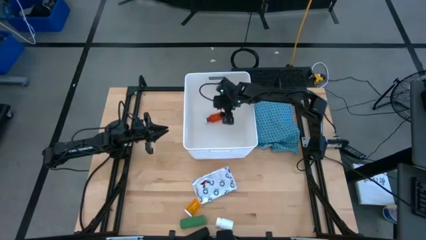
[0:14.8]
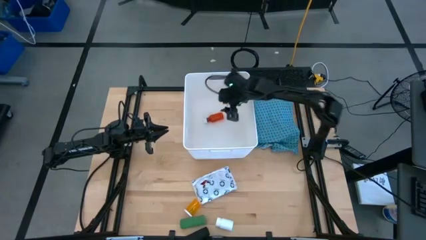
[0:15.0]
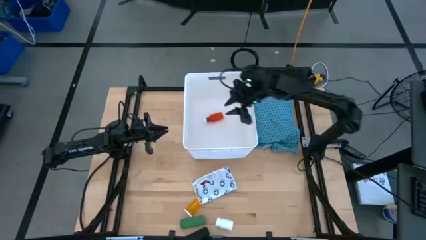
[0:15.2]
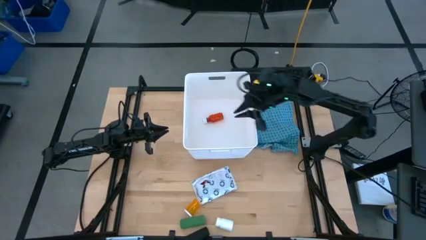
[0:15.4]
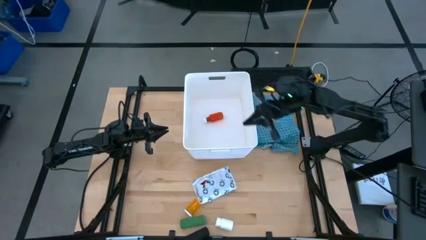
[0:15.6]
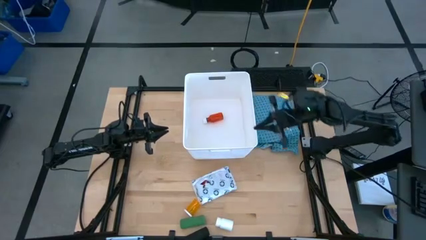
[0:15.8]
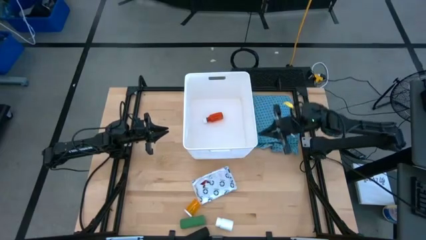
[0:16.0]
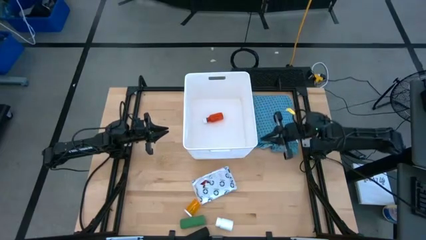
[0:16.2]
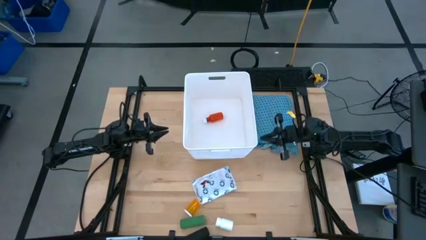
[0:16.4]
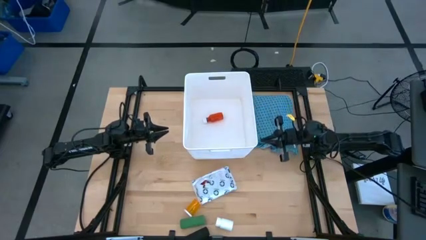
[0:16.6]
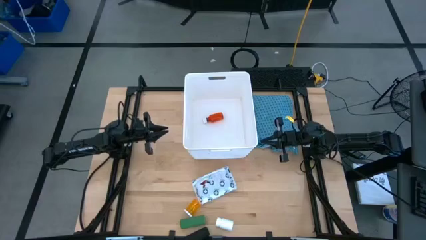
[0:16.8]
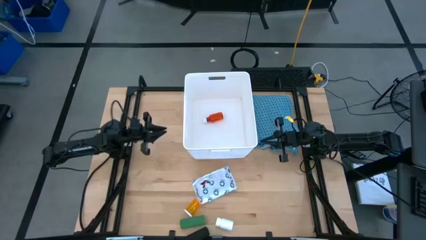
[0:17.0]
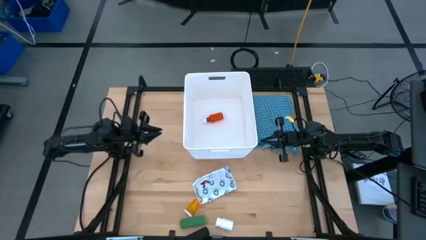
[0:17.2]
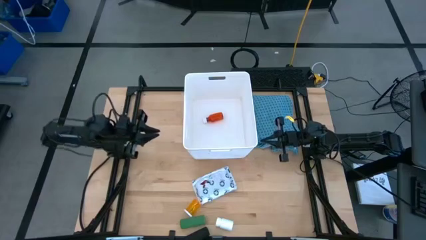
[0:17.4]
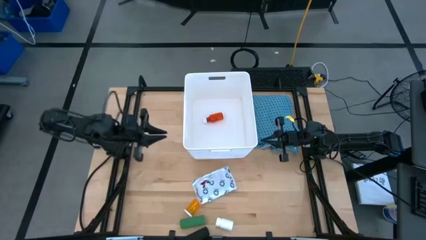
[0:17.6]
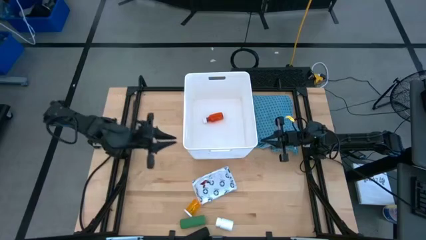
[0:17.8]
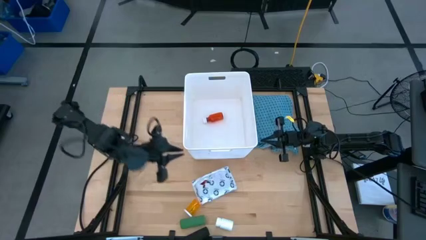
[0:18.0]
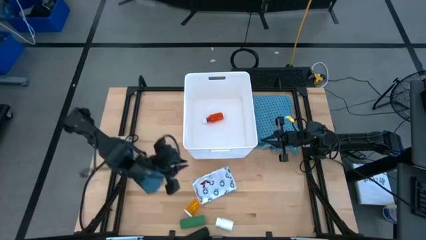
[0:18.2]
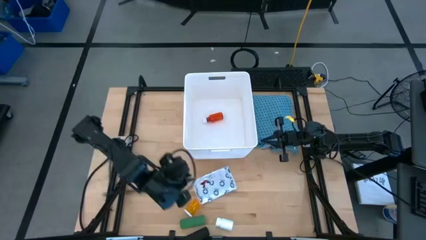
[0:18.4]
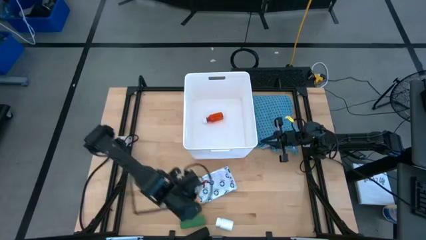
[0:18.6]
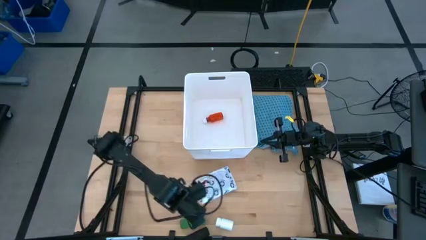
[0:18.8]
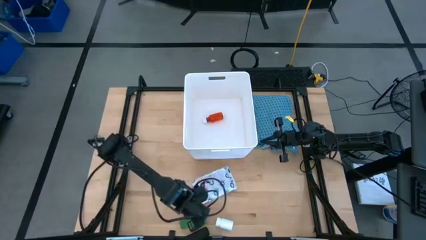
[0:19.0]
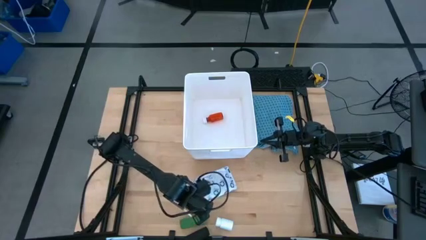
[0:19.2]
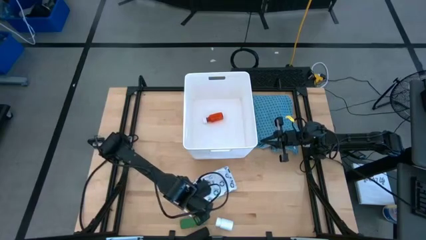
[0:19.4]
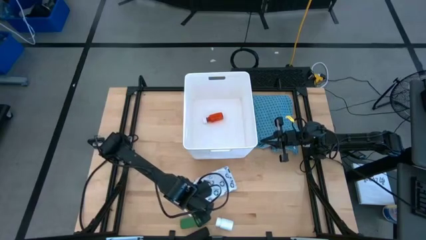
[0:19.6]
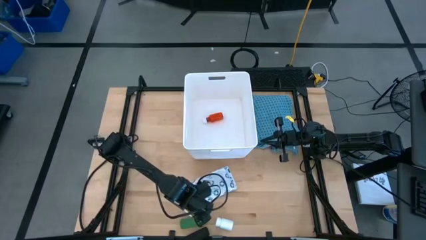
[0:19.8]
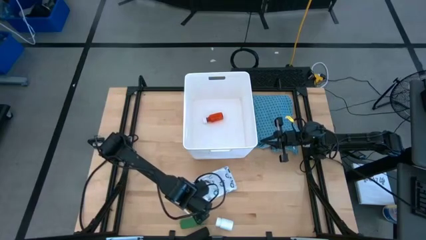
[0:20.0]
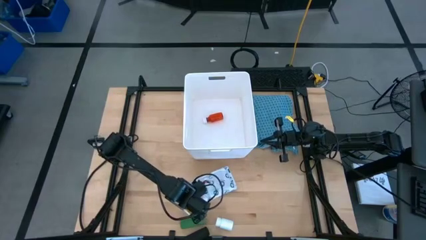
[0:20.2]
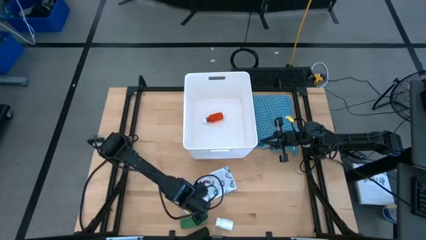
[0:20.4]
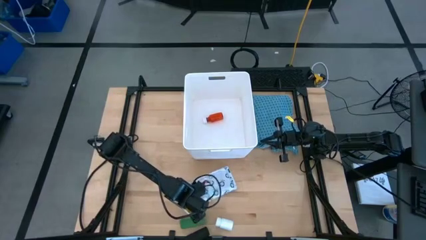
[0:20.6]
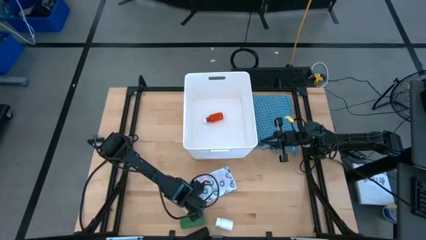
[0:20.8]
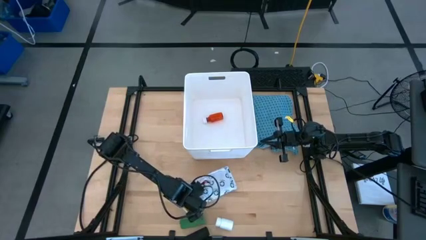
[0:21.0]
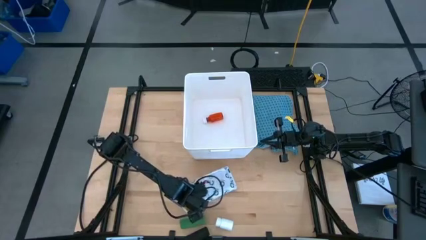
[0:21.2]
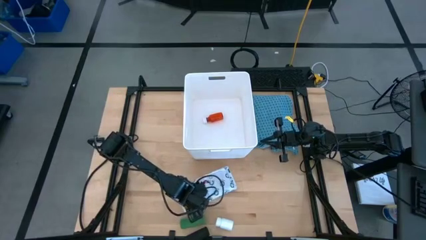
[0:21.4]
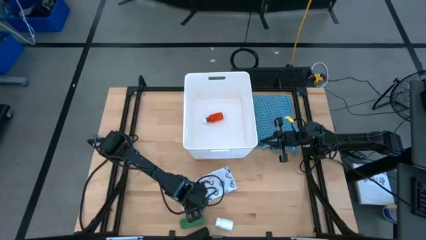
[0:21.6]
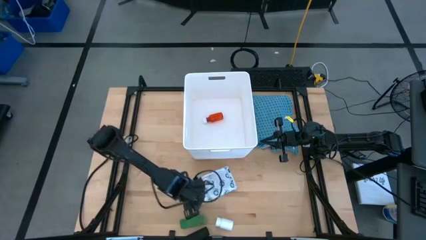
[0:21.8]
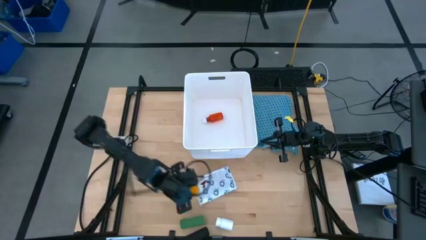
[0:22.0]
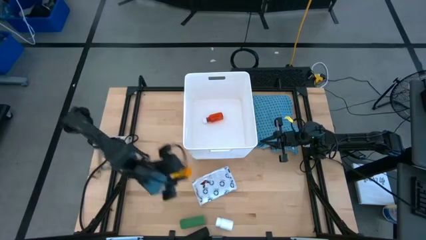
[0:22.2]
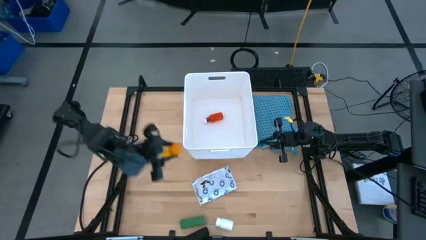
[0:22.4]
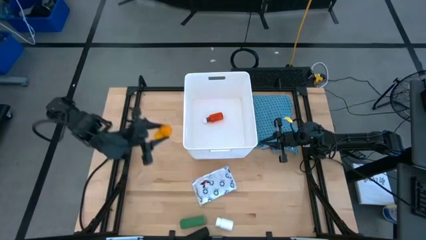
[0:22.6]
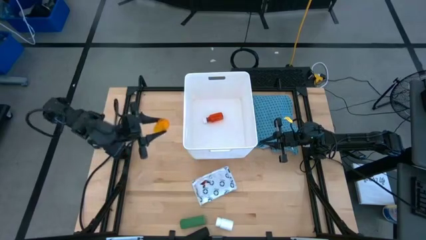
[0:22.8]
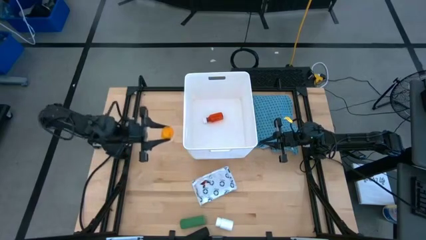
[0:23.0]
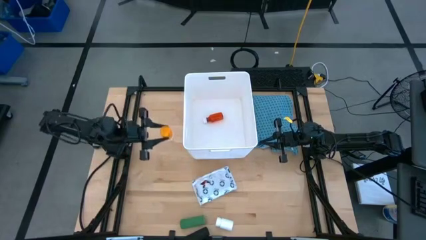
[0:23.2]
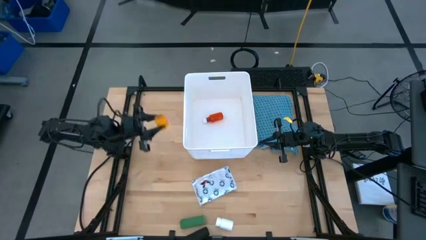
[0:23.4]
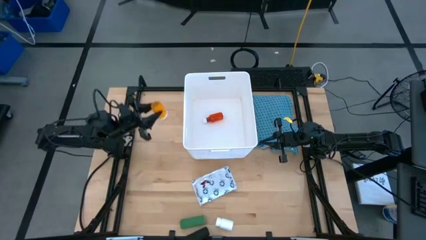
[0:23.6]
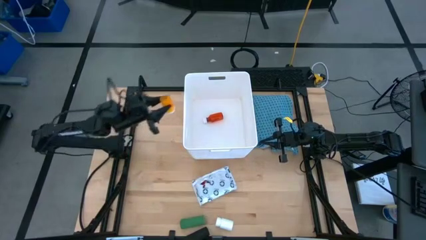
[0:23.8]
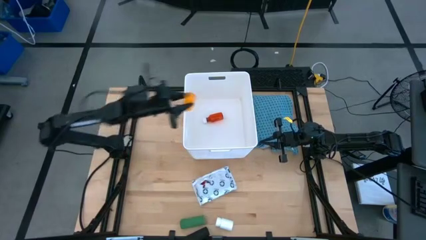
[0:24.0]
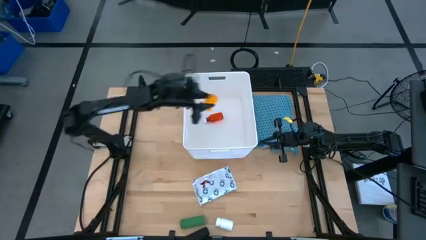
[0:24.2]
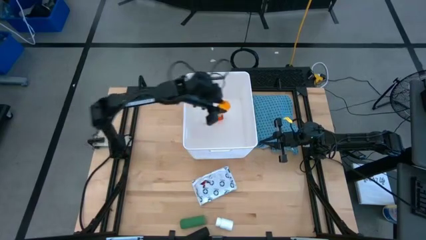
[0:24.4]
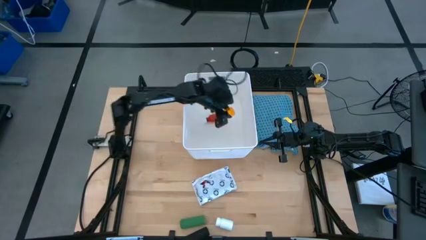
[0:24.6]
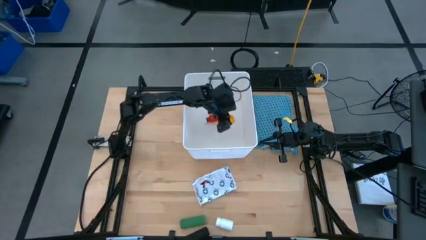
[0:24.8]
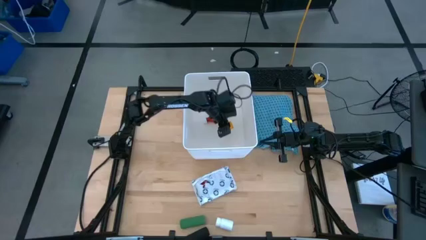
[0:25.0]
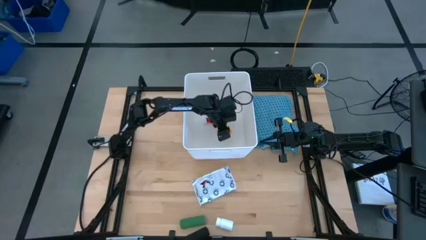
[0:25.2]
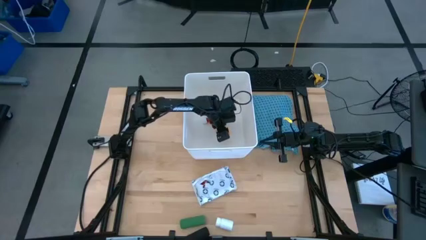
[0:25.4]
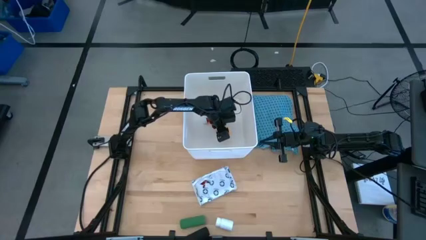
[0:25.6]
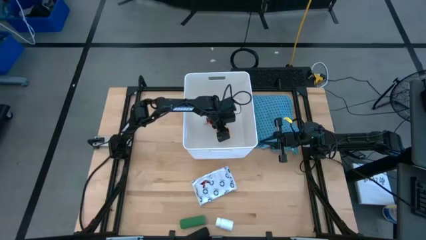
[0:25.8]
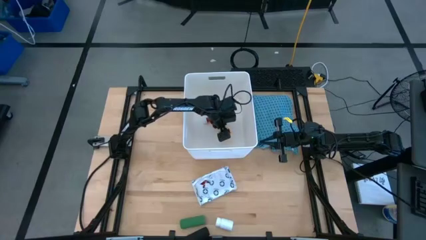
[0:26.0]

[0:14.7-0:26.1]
Task: Pick & place medical supplies in basket/bin
Put the orange medicine bottle into the white bin

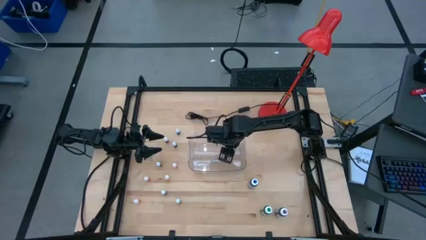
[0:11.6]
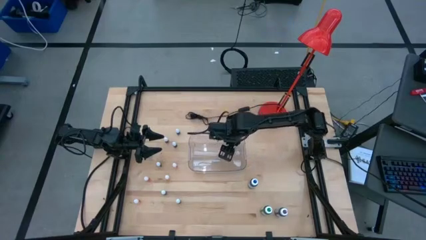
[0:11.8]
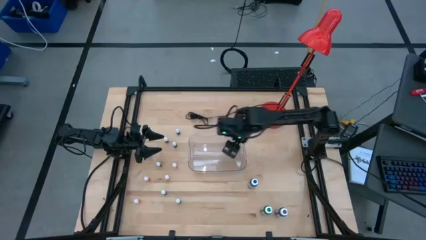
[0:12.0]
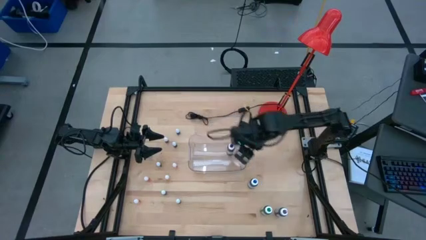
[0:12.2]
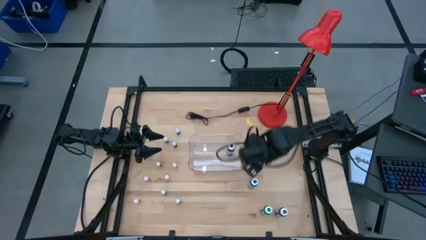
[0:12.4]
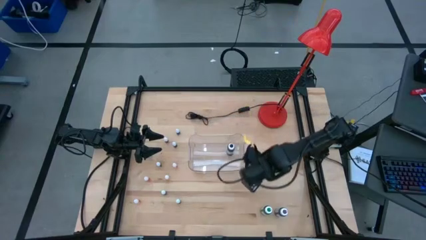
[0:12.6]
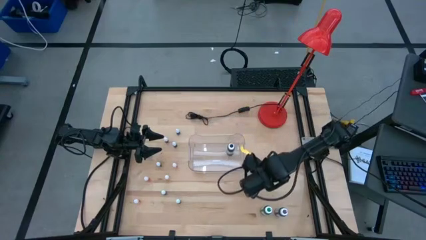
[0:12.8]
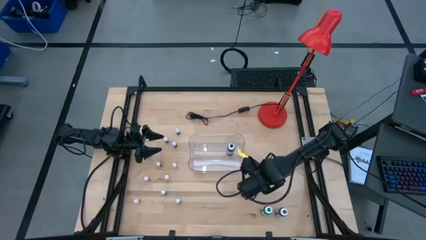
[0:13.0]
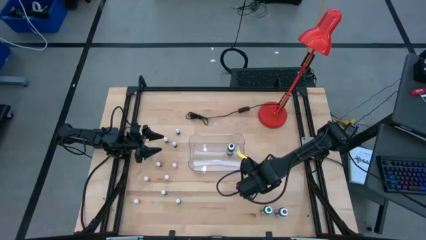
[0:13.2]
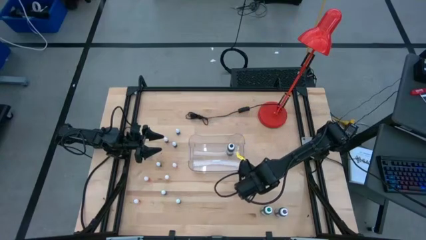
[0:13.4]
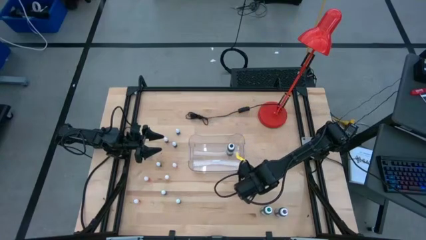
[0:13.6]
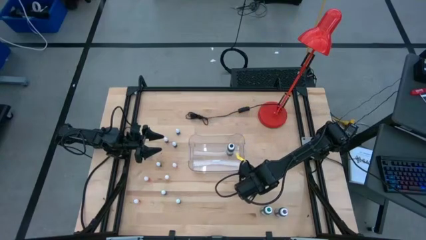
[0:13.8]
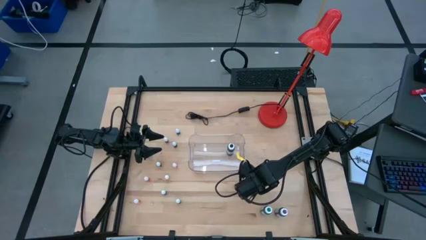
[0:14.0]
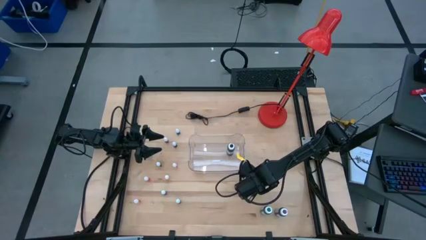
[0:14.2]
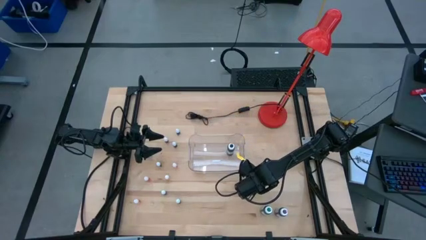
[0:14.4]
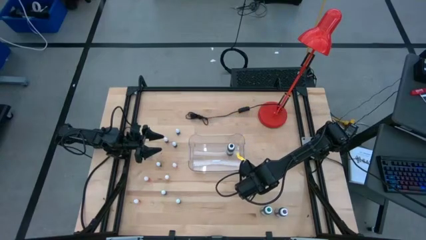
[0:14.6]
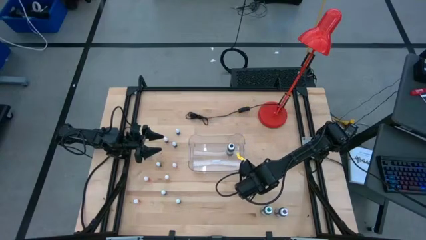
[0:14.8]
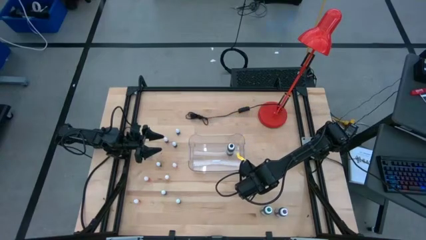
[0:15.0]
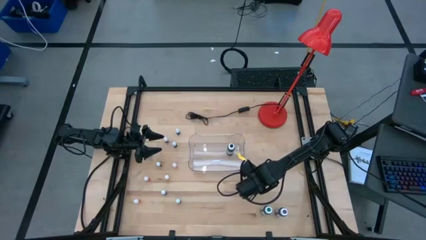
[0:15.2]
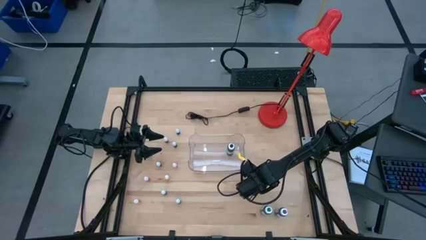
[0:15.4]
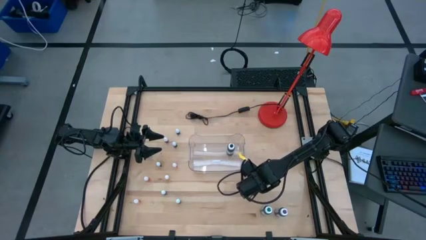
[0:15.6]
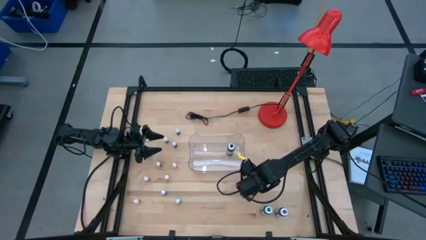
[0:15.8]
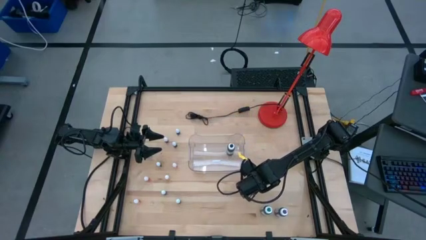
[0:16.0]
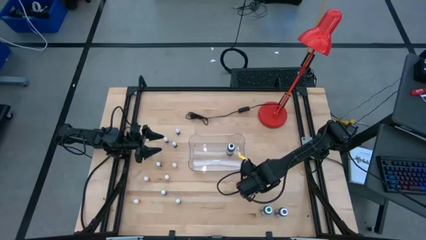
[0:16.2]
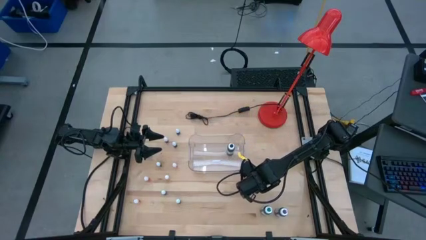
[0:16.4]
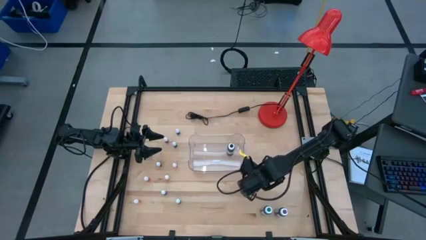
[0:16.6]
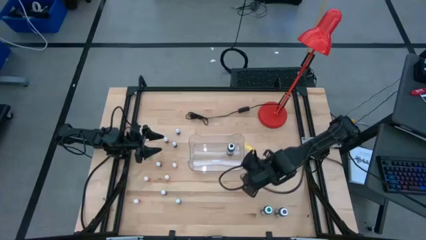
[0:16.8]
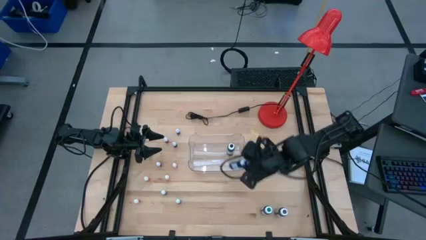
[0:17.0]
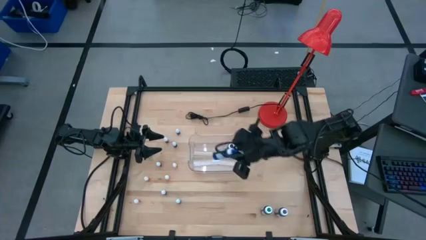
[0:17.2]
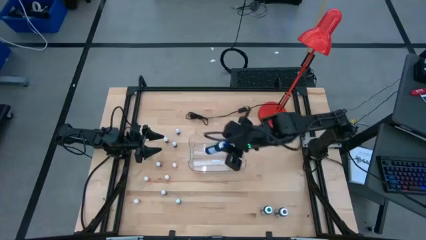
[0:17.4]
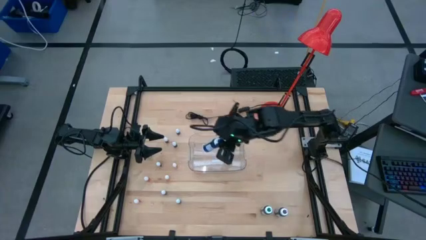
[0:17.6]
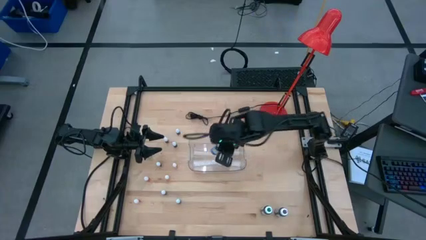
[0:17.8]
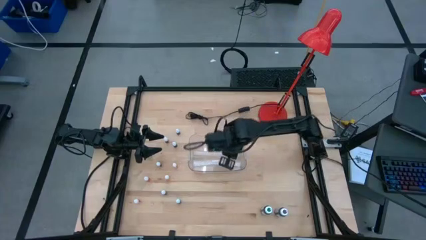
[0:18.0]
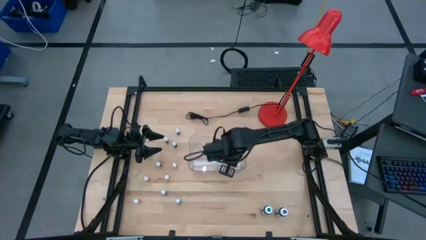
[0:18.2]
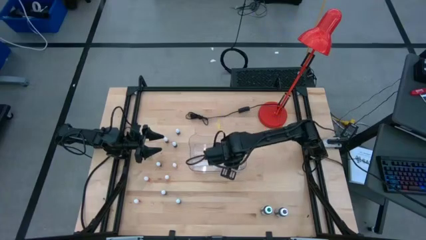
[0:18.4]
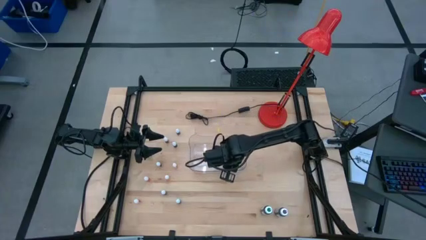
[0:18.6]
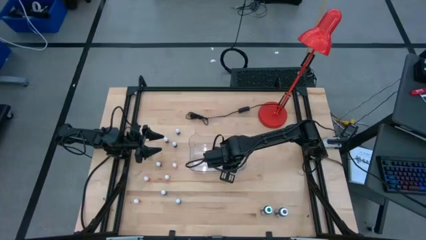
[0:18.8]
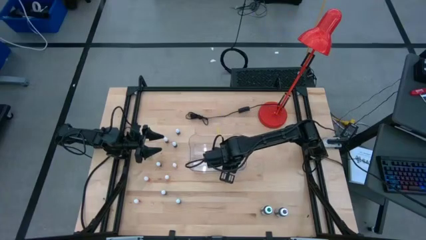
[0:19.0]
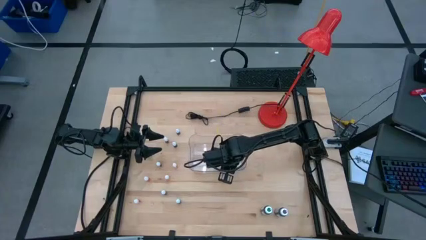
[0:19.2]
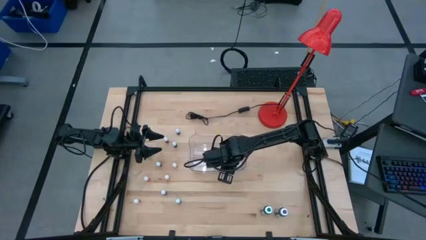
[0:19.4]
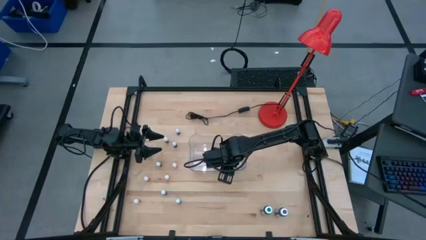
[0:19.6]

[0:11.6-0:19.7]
Task: Pick & Place food coloring
Put the large blue food coloring bottle into the transparent bin
